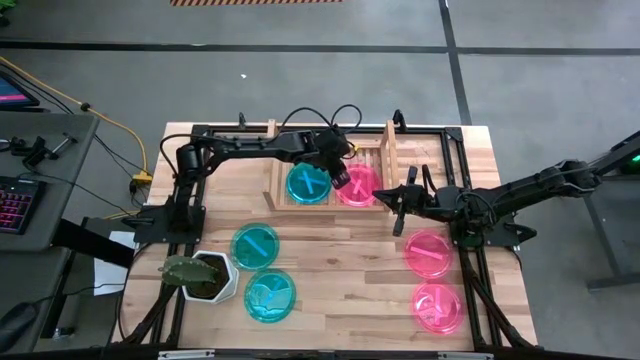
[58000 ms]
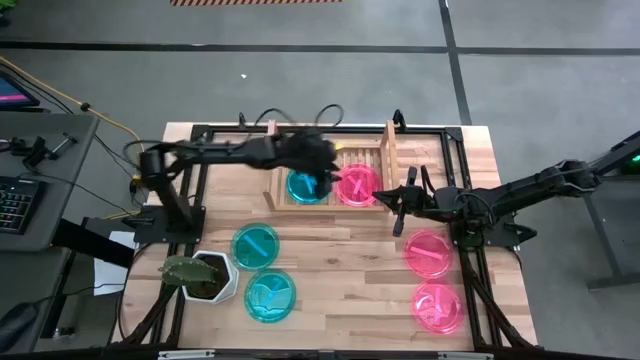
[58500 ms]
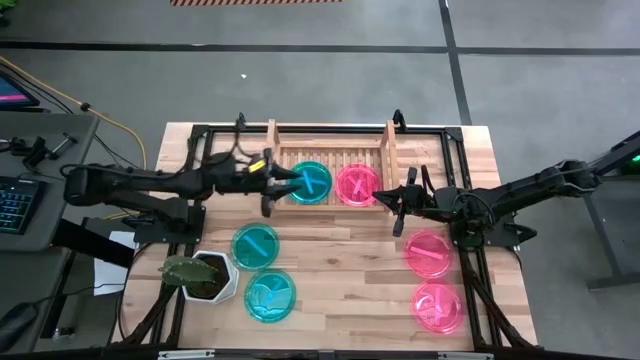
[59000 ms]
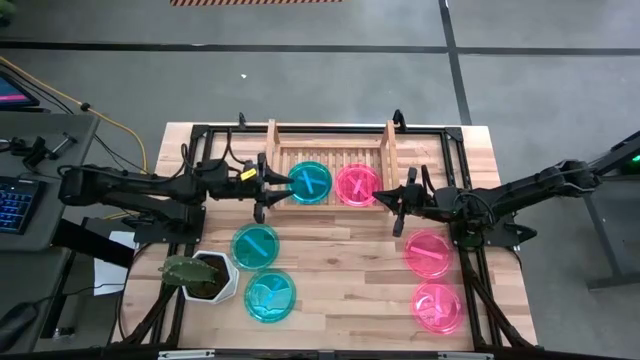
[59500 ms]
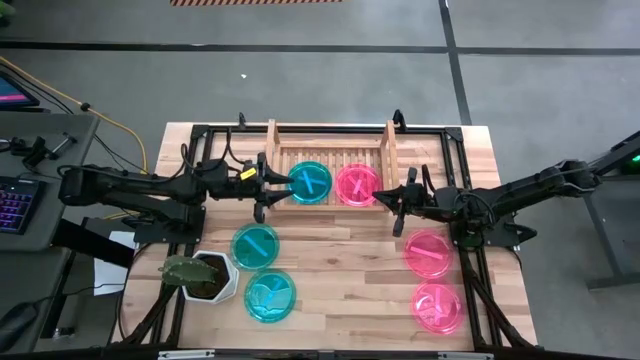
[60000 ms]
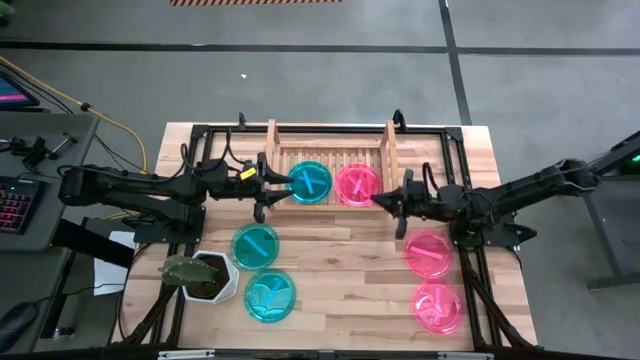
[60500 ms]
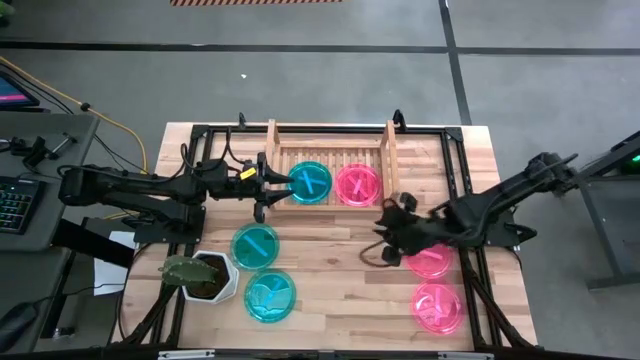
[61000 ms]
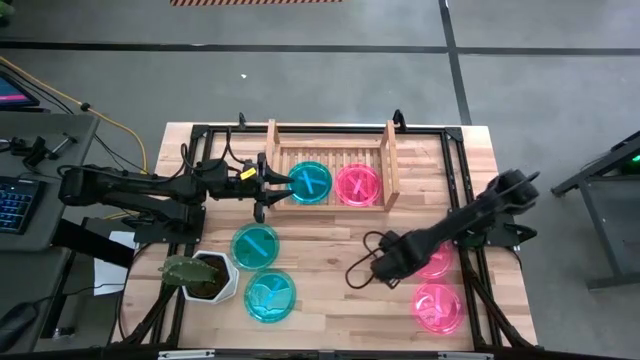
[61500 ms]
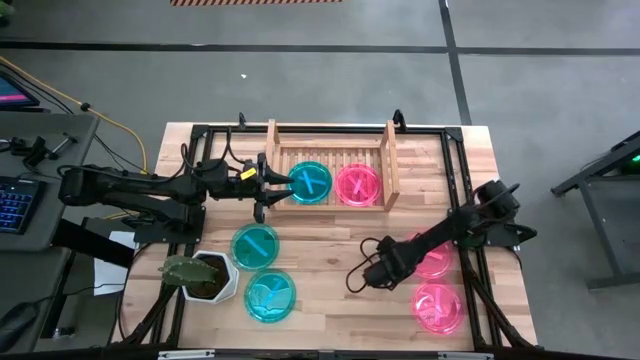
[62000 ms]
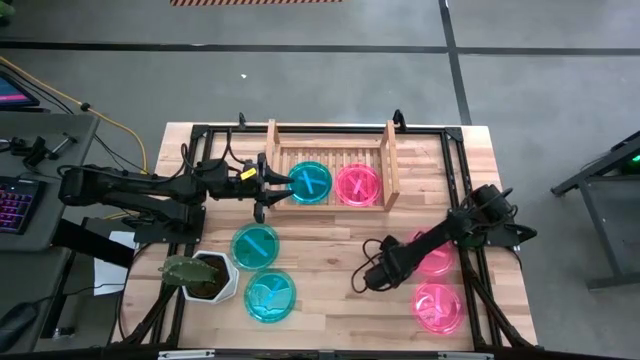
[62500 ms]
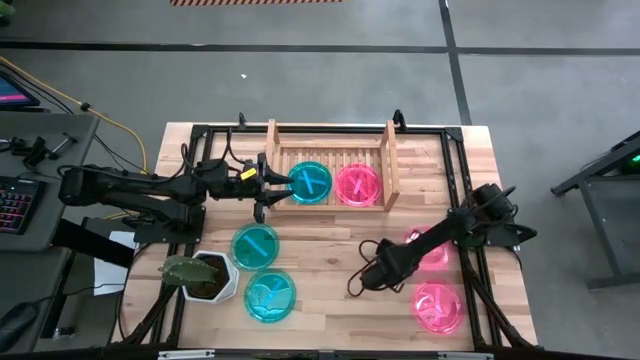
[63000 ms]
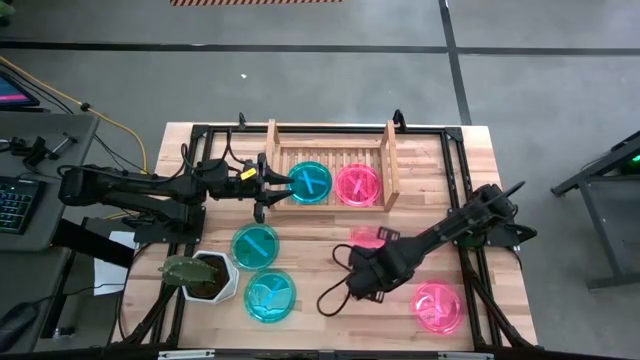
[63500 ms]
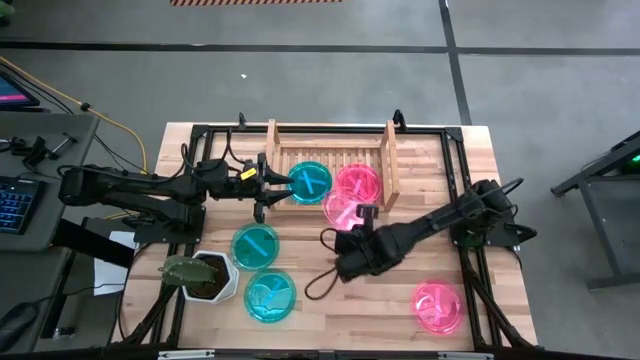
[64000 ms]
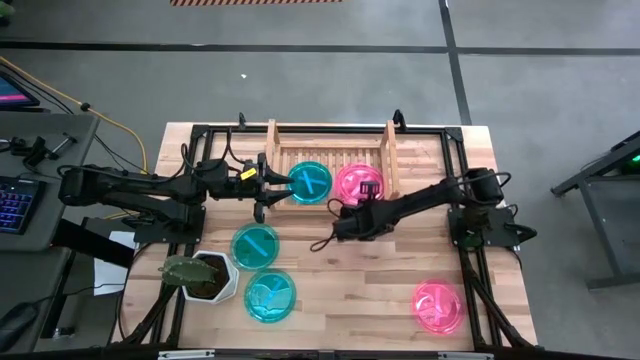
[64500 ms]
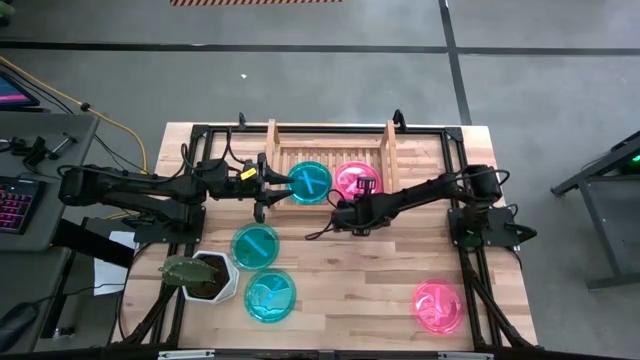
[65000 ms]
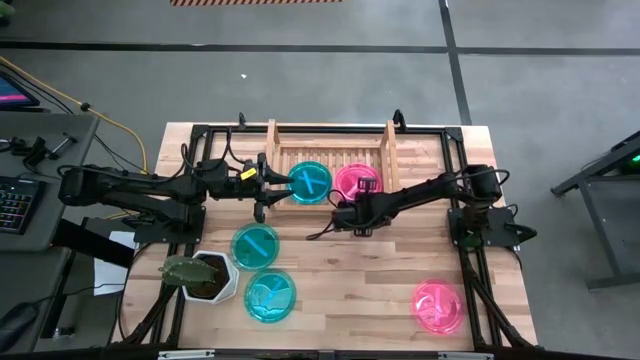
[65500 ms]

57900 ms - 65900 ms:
Task: Place and stack plates onto a shelf
Stack the pink plate on top of the pink plates on the shelf

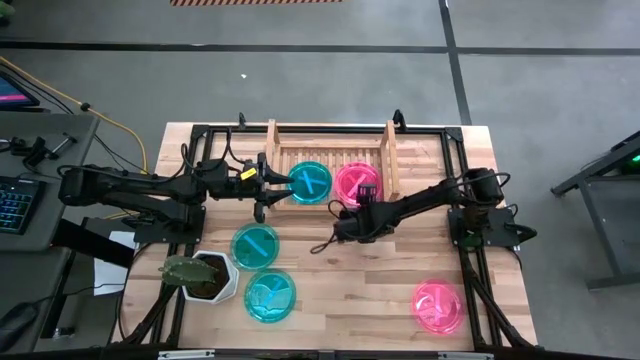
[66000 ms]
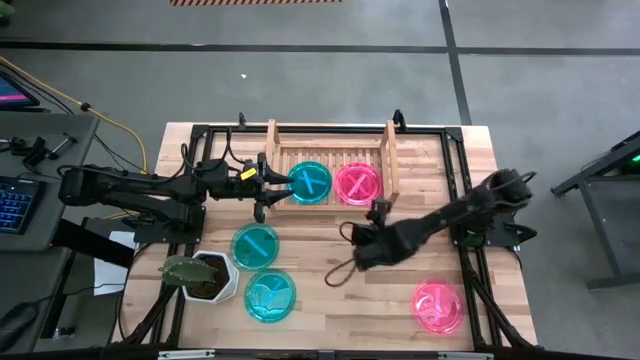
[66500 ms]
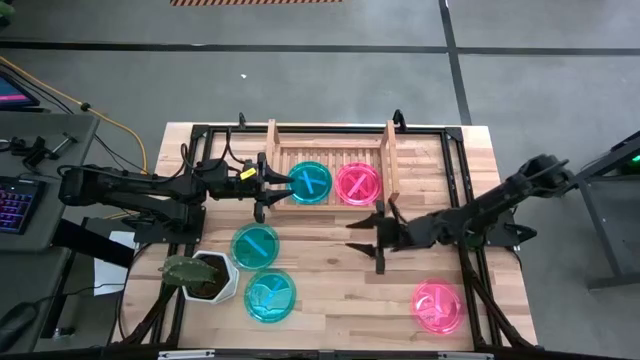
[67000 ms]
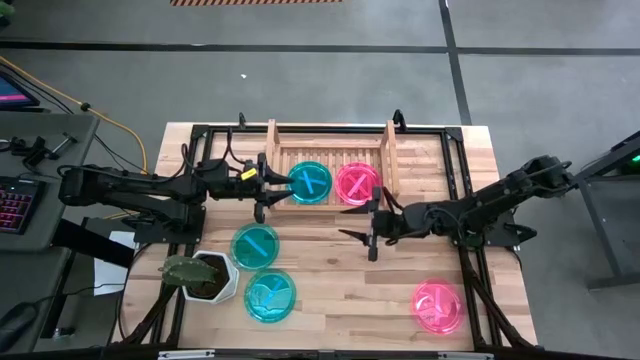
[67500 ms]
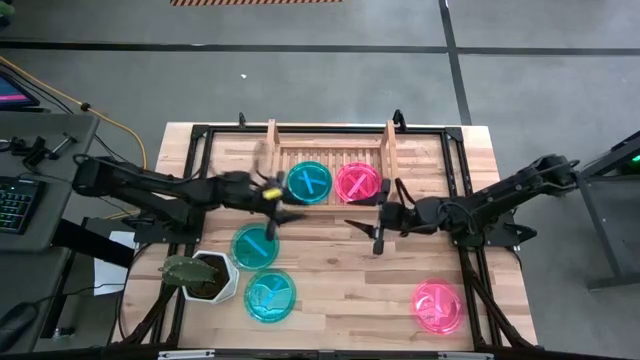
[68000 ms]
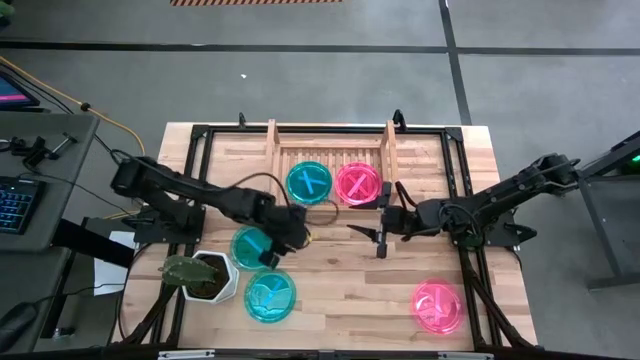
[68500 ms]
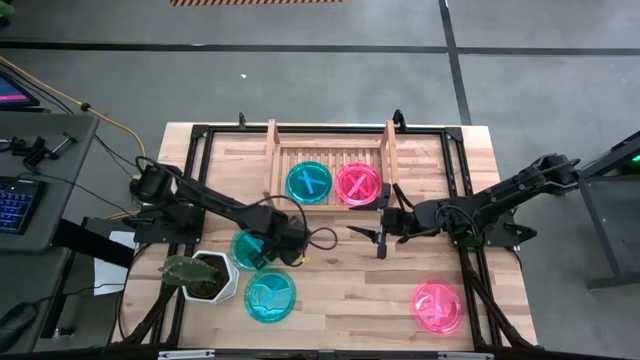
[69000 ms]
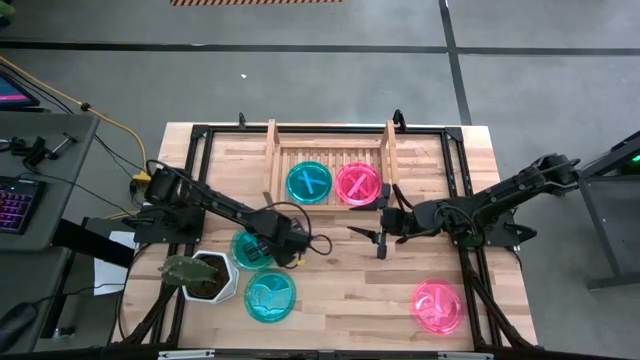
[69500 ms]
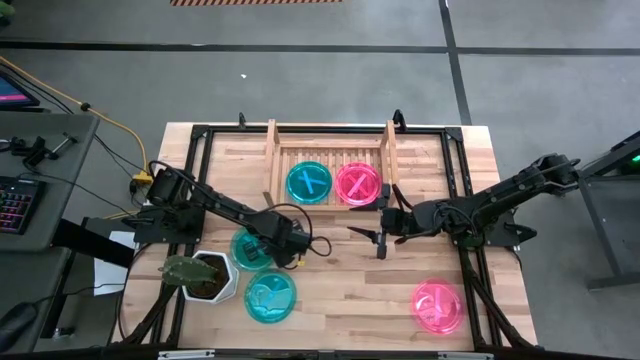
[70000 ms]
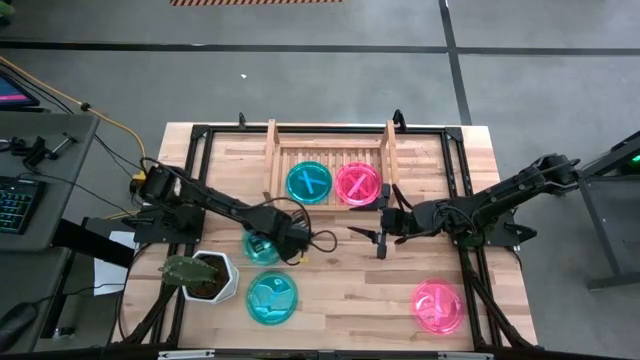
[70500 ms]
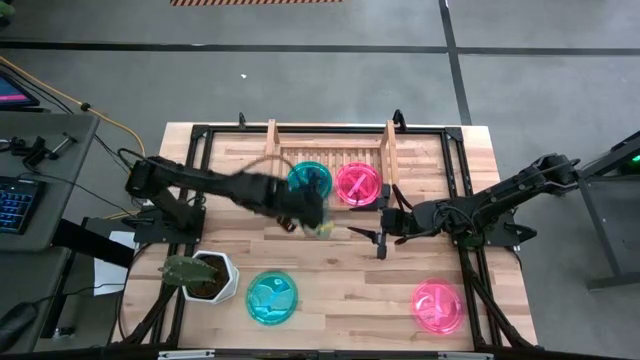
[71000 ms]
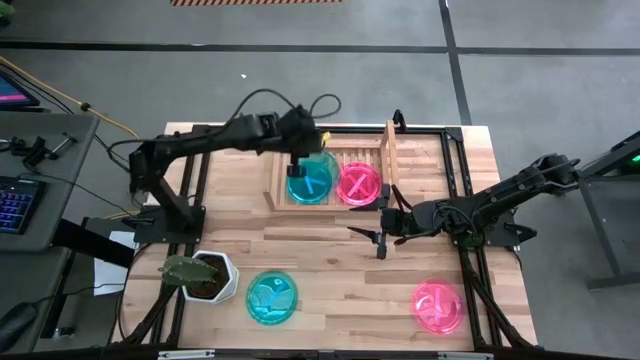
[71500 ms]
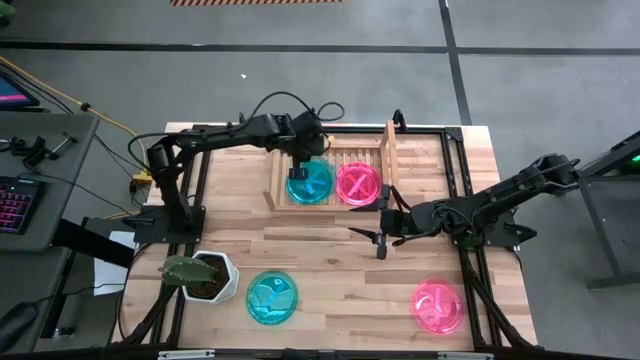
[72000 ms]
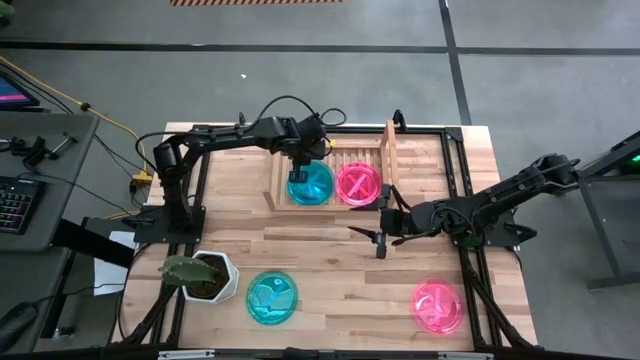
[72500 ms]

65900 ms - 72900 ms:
Stack the blue plate on top of the blue plates on the shelf

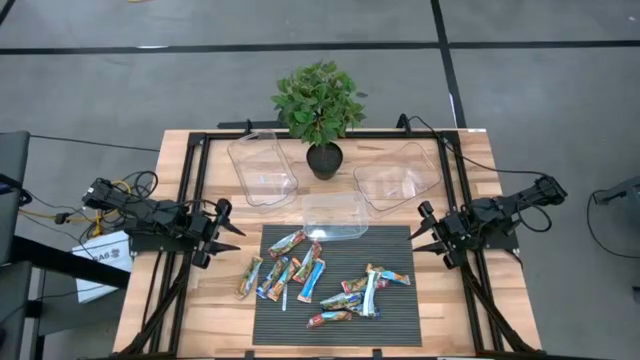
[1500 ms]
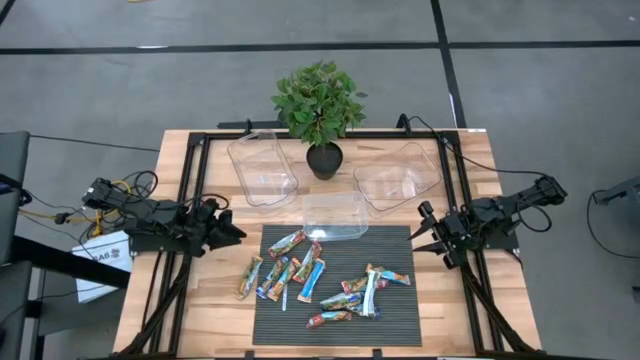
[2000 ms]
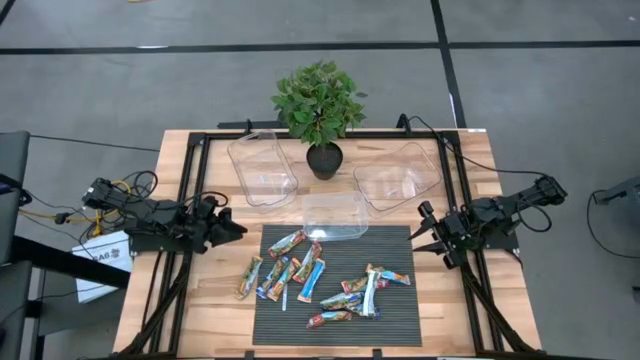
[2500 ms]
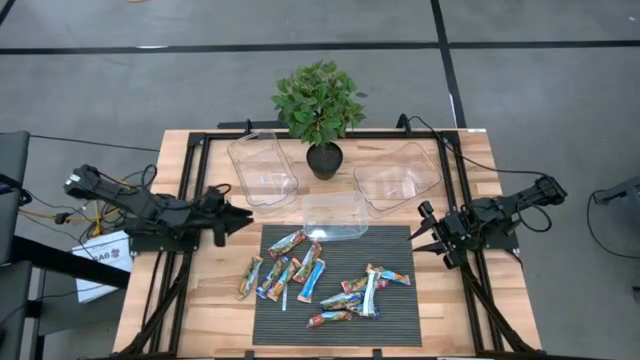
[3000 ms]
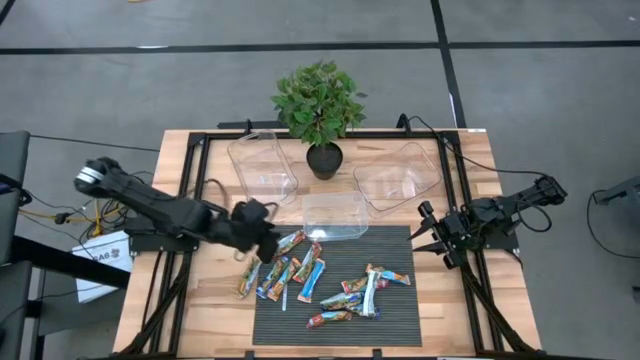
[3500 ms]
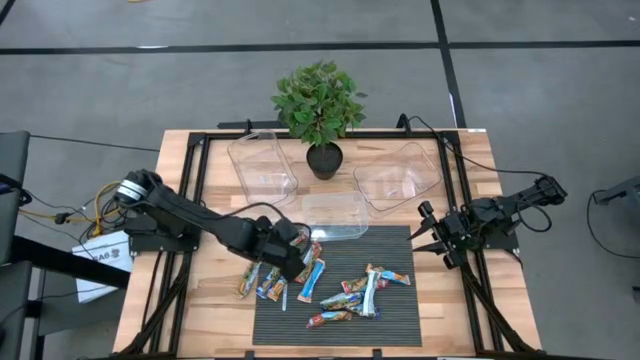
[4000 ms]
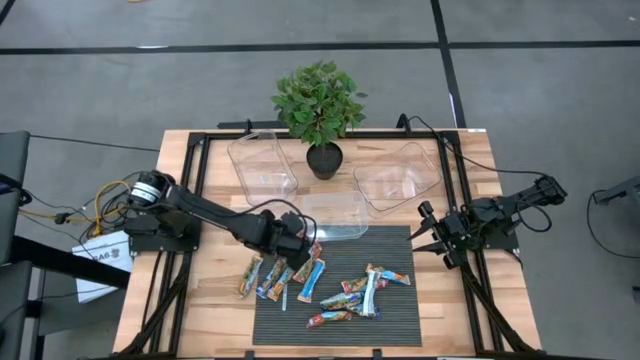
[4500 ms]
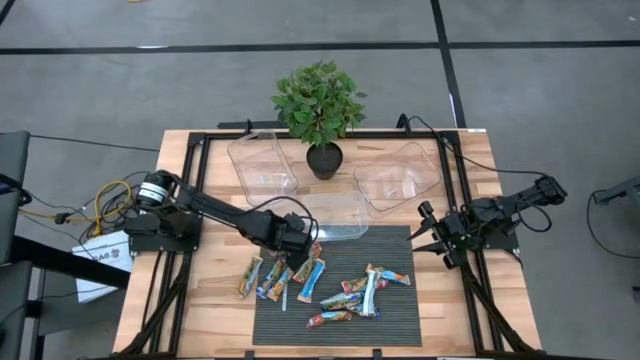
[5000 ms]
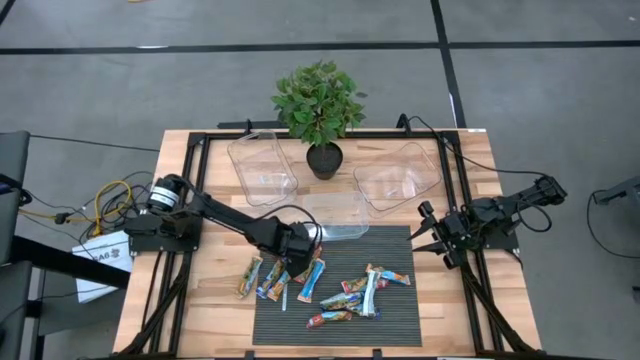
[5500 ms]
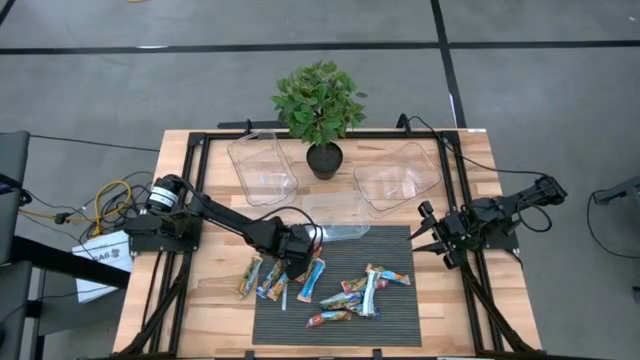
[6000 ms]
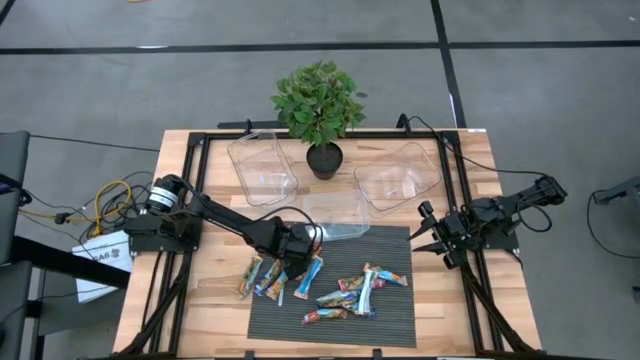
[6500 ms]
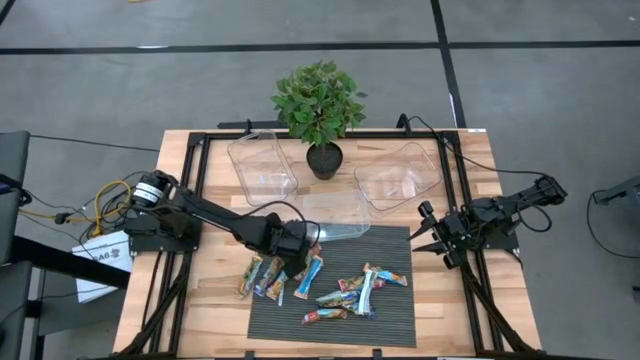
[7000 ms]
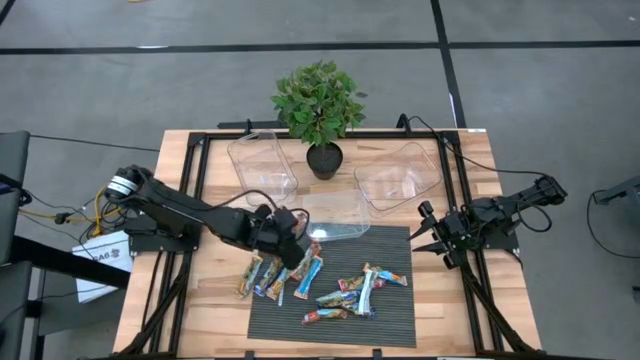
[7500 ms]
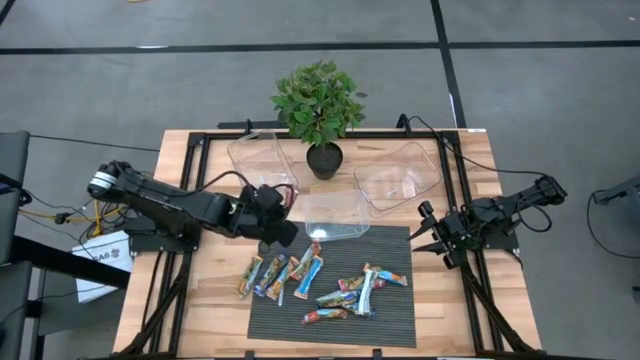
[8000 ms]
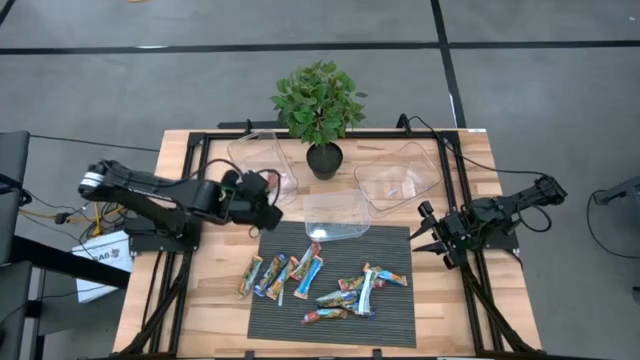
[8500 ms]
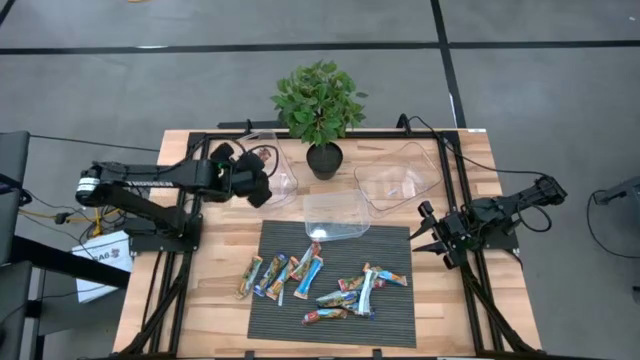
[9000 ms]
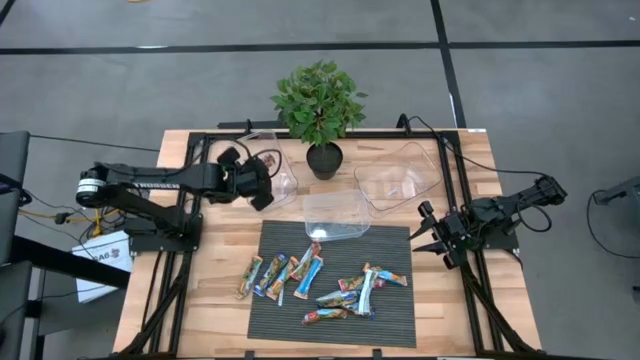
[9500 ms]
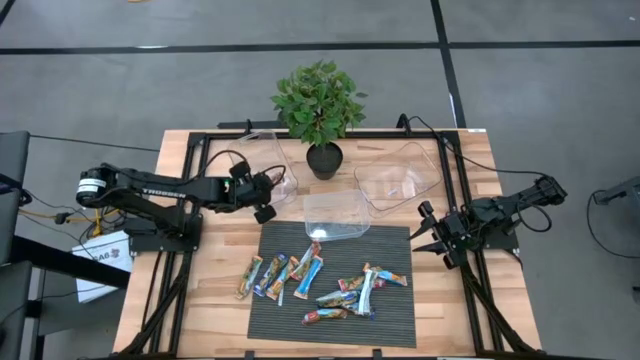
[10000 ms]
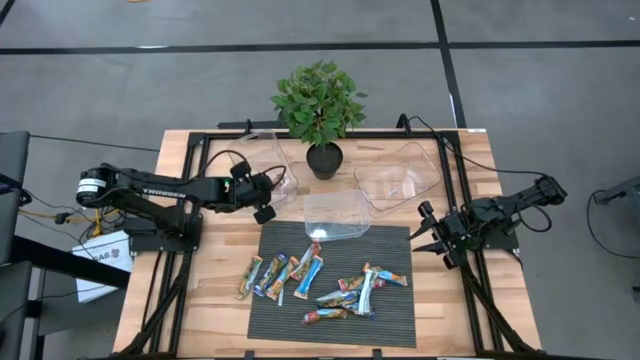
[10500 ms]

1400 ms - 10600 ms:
Task: Pick and place Granola Bars by type
Put the red granola bar into the left transparent bin
